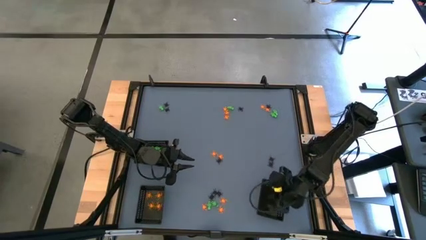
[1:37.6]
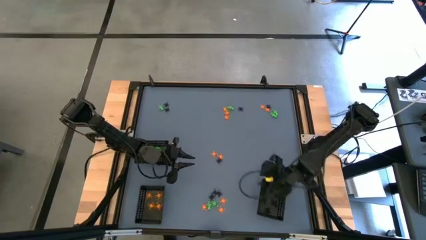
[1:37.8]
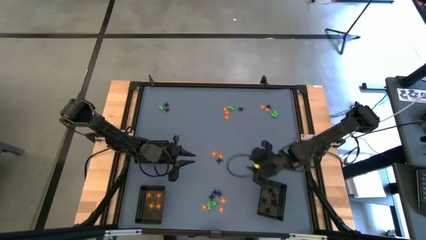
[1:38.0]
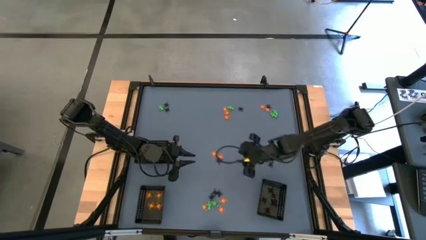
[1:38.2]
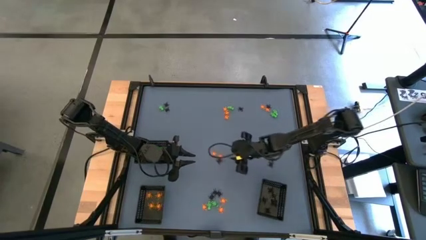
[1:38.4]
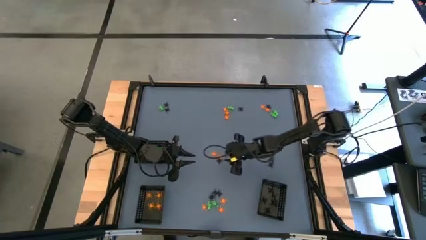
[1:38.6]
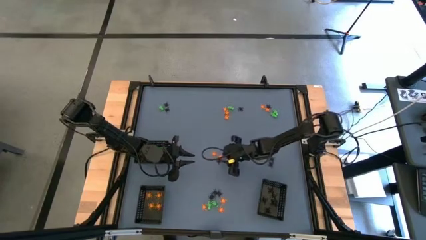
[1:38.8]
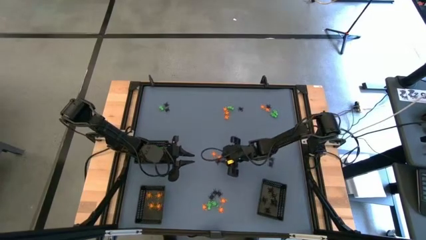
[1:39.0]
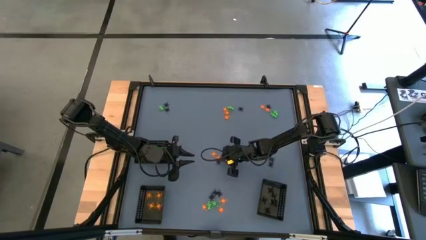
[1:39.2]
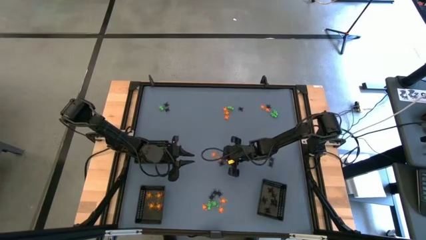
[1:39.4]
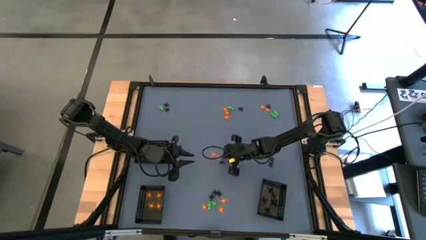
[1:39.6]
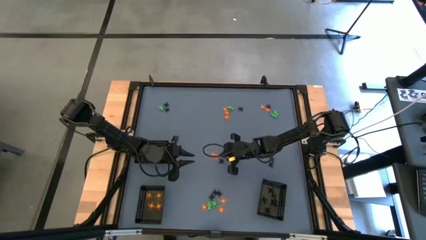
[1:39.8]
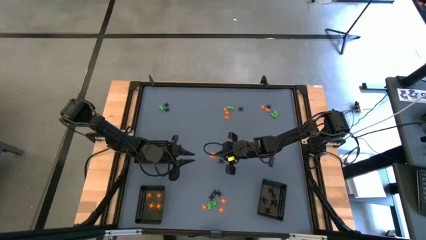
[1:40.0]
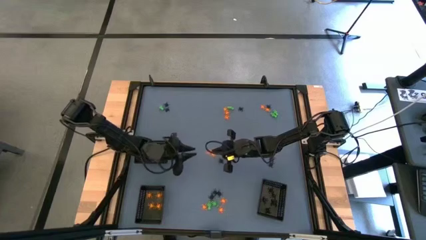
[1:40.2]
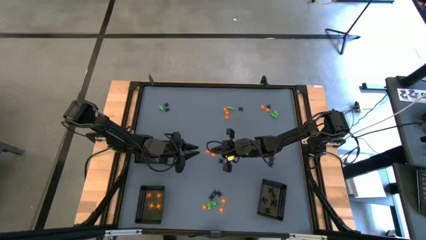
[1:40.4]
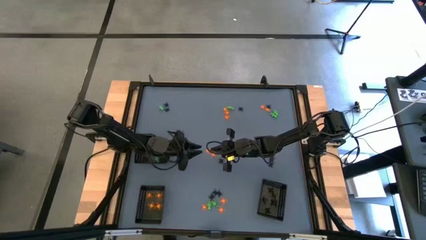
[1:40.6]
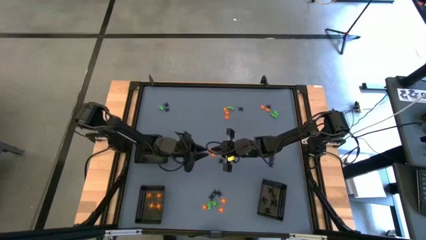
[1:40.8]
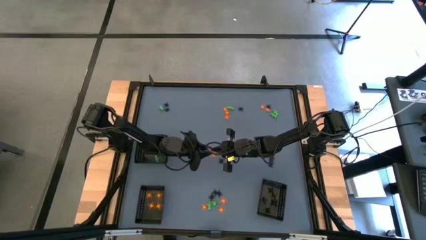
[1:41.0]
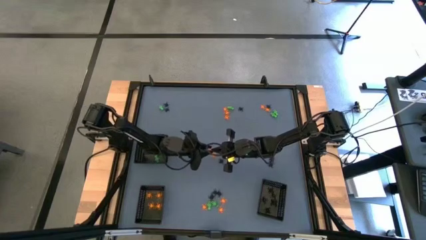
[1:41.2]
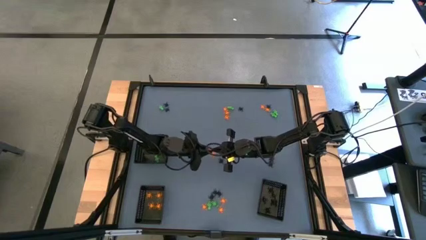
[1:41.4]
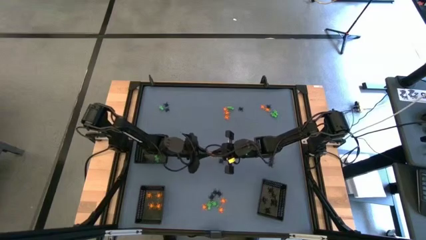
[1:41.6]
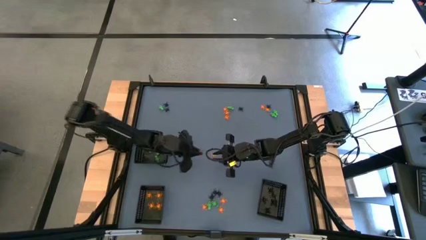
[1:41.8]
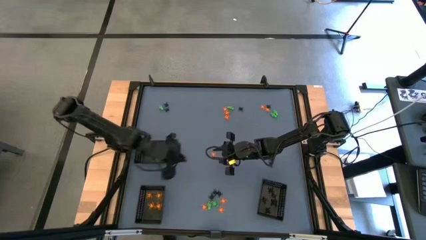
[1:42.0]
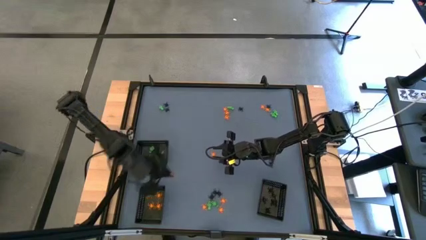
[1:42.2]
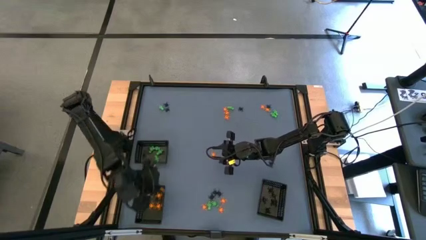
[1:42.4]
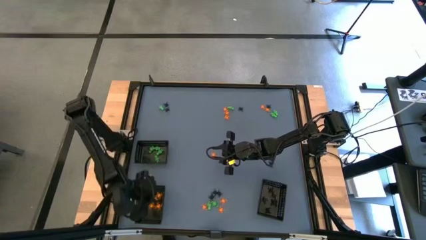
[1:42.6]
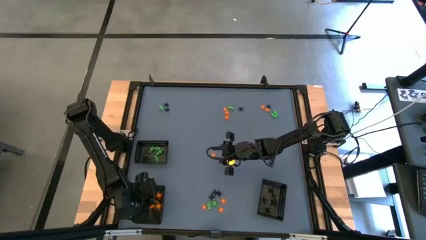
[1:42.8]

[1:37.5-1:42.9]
Task: Sort Halloween decoration
Put the orange spider toy into the bottom left black bin

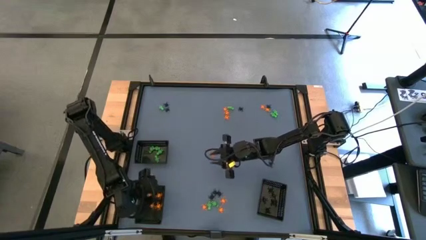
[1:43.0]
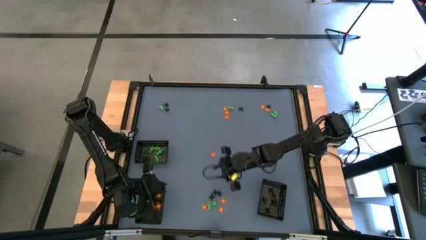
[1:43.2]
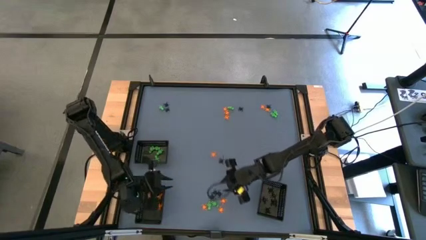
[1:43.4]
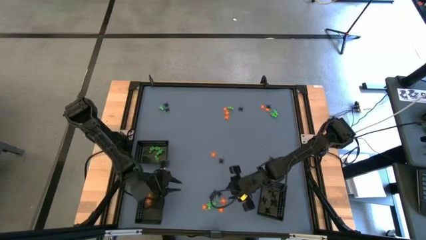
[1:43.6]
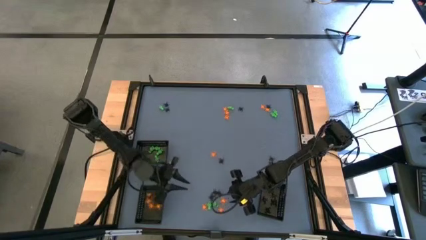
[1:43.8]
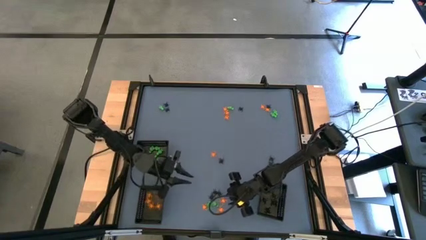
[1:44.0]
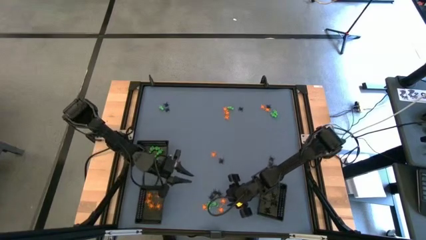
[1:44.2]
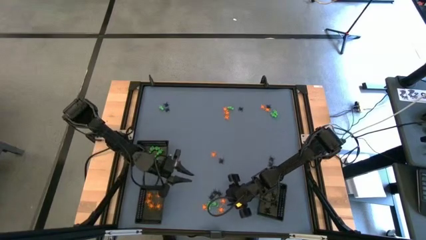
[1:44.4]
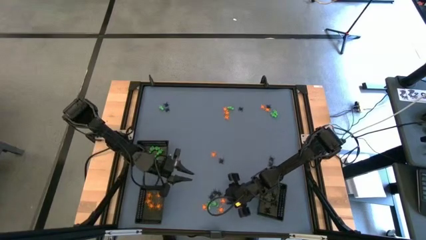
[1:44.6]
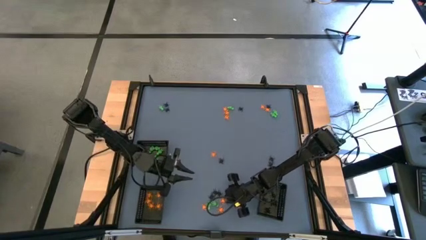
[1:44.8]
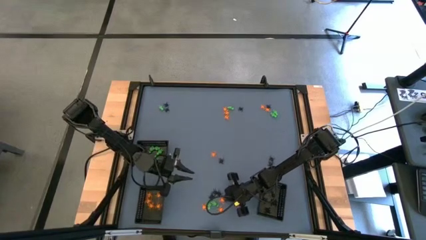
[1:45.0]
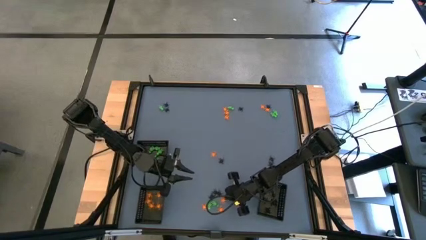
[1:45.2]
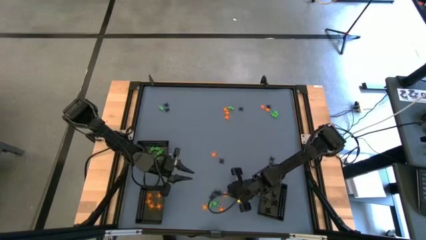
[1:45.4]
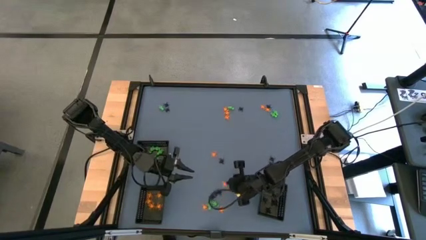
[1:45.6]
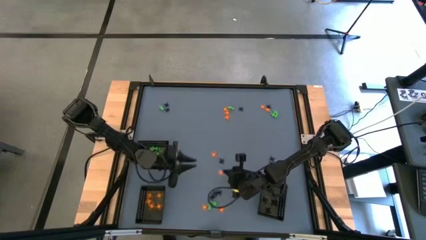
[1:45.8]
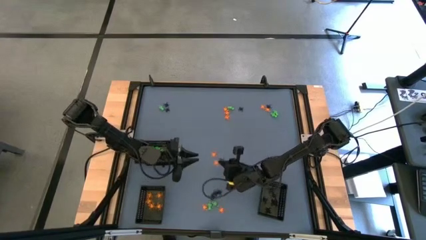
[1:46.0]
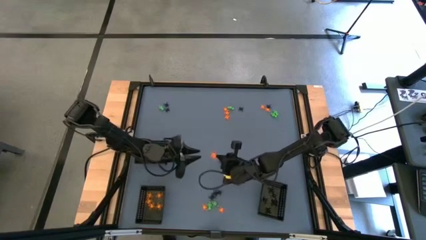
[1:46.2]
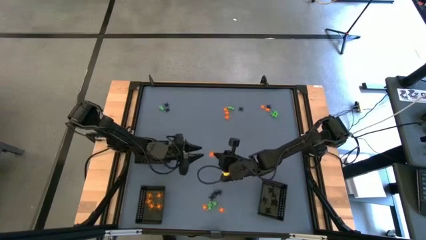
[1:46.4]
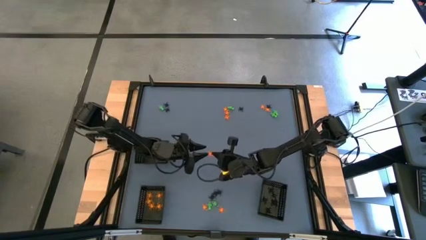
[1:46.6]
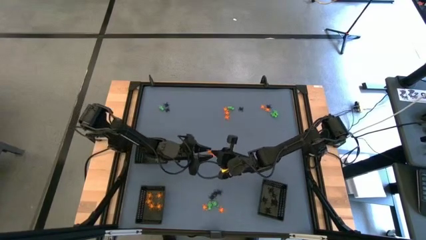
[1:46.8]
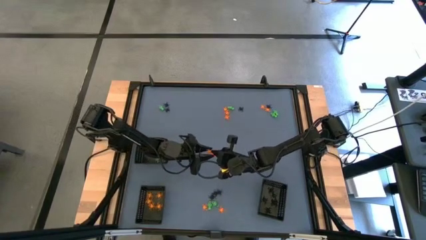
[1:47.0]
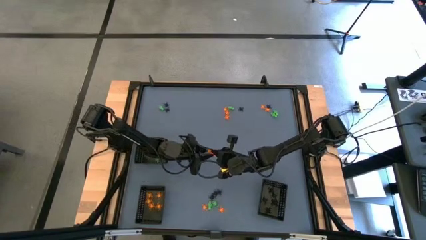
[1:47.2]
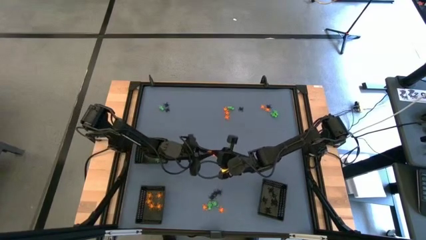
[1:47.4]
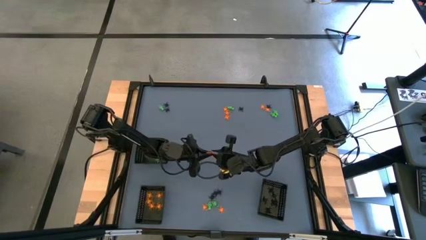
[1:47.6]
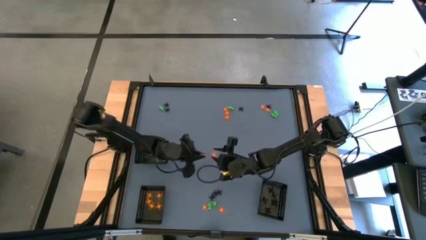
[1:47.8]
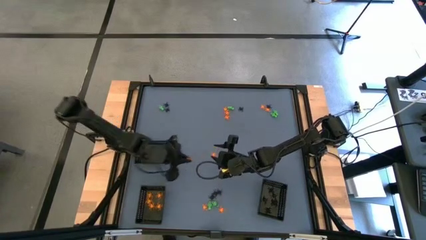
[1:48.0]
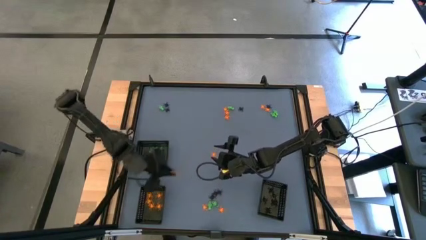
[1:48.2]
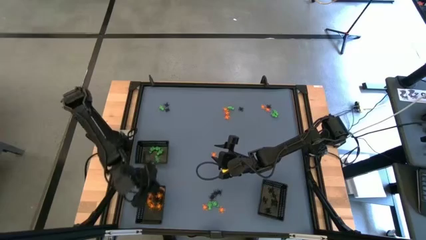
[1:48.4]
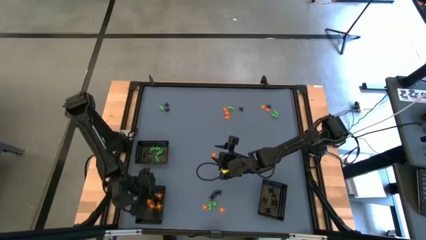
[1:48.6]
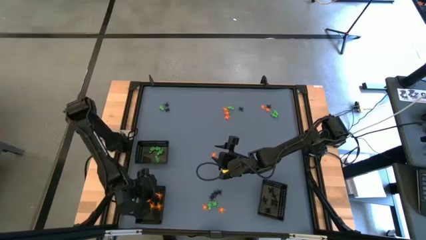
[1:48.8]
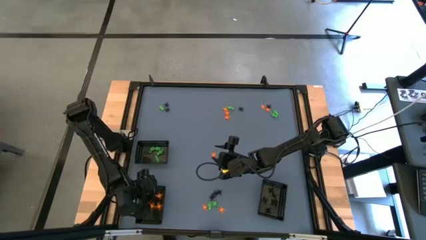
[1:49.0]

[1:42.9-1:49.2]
Put the orange spider toy into the bottom left black bin

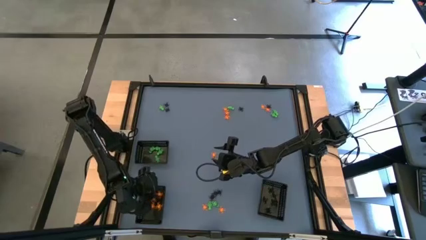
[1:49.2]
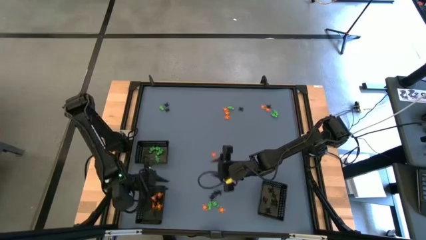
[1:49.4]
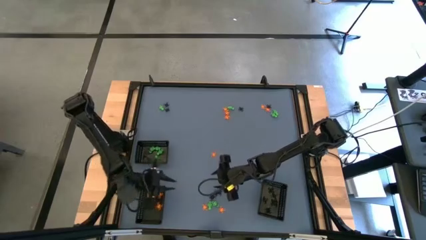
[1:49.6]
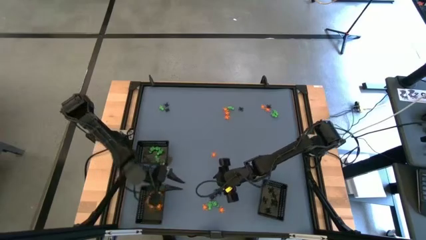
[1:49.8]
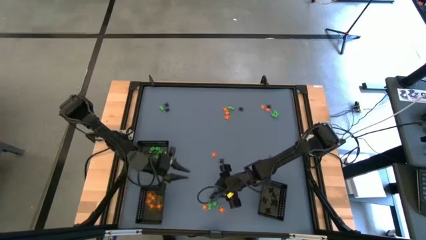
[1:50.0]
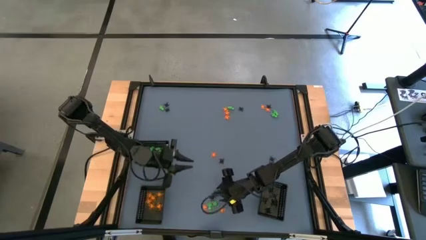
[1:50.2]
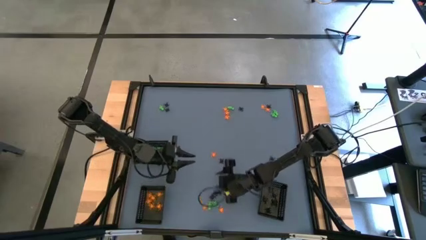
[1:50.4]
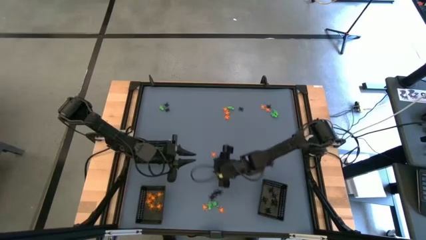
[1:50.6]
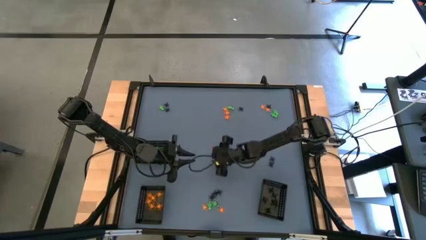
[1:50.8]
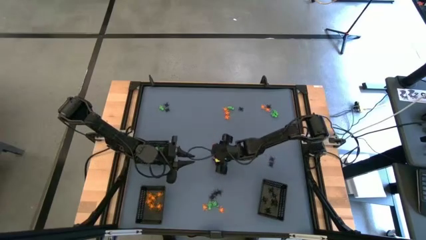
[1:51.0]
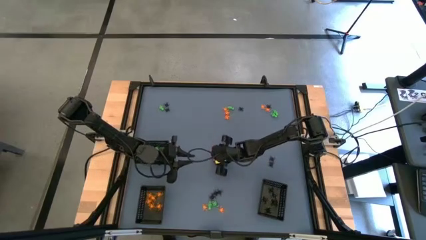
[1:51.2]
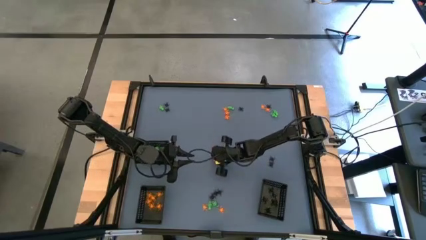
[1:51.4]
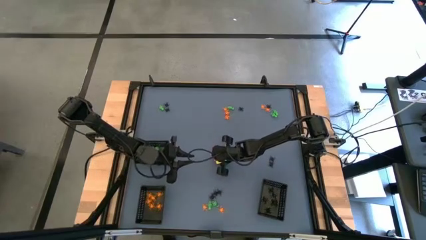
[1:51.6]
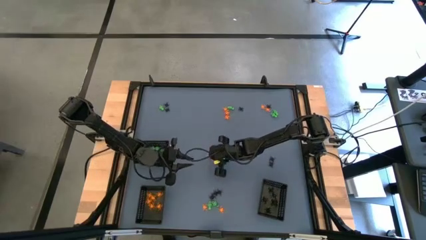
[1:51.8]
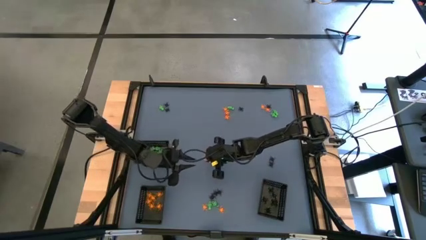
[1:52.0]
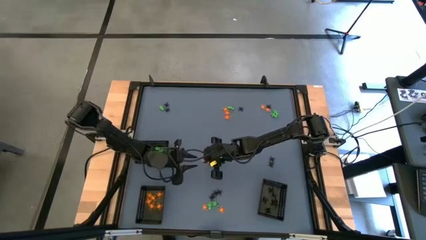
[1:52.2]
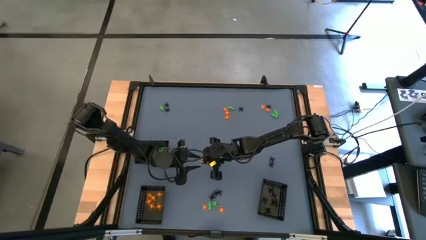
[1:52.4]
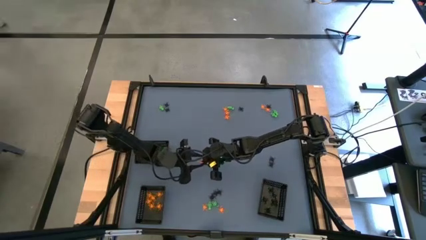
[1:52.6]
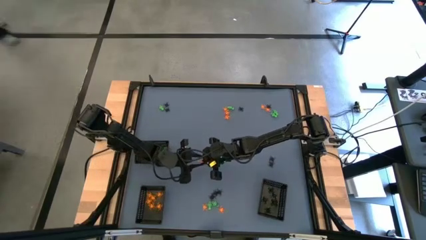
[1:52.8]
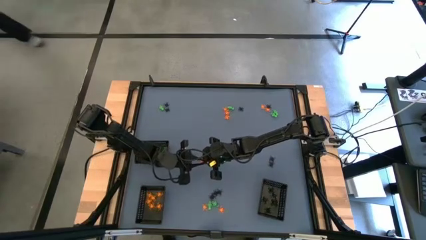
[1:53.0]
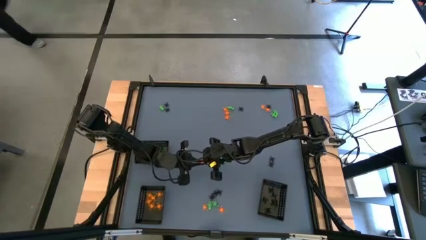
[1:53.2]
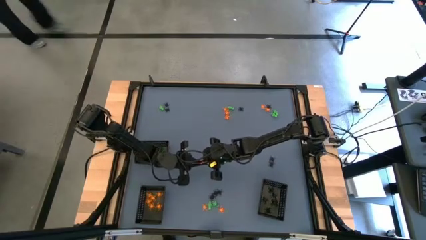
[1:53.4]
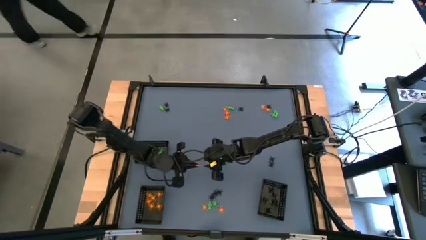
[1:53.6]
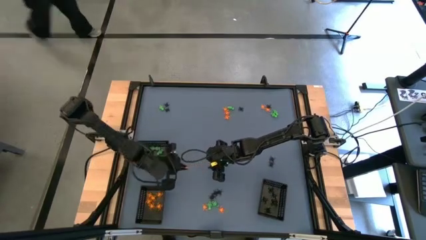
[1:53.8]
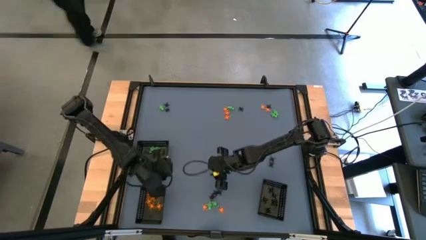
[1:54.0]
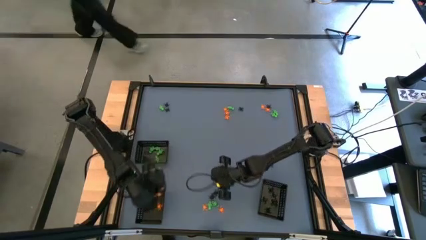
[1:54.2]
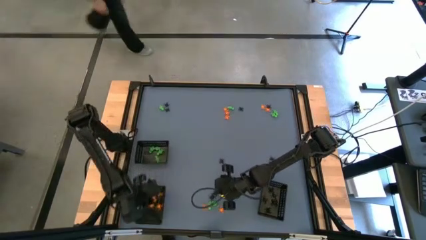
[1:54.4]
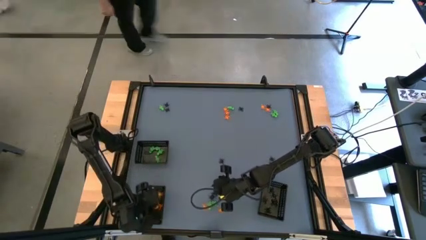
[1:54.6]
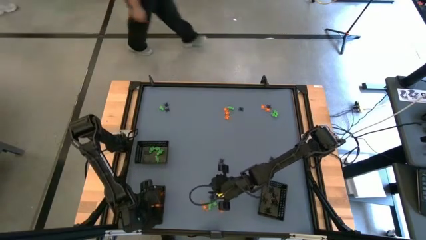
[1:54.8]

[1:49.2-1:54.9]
Put the orange spider toy into the bottom left black bin
